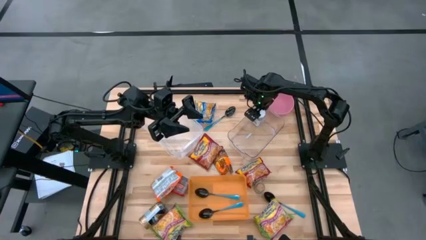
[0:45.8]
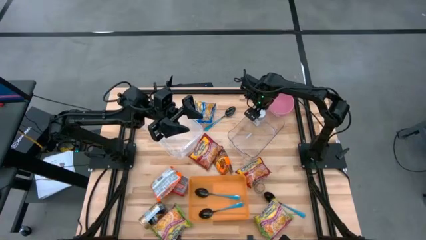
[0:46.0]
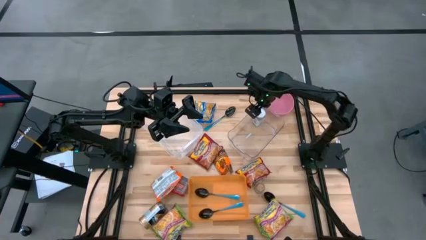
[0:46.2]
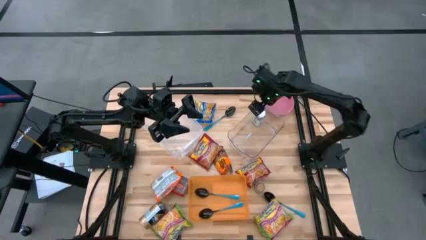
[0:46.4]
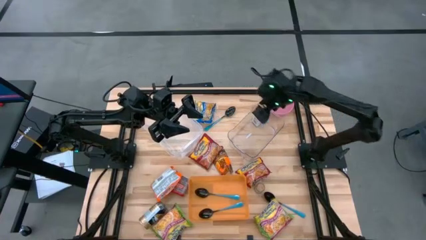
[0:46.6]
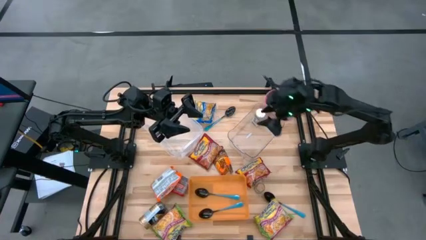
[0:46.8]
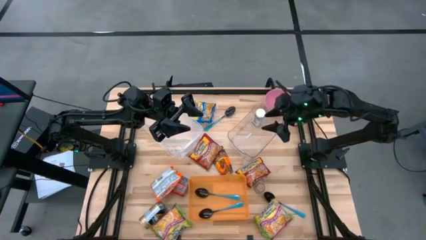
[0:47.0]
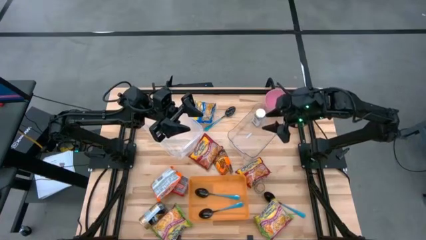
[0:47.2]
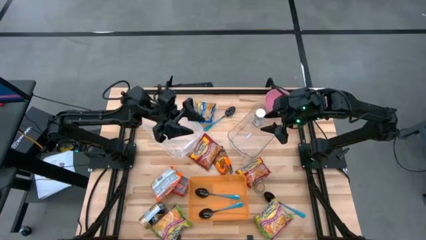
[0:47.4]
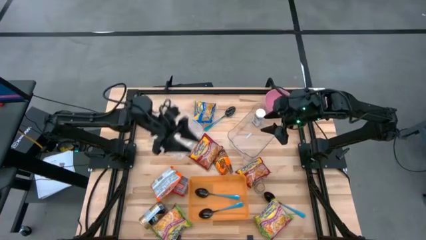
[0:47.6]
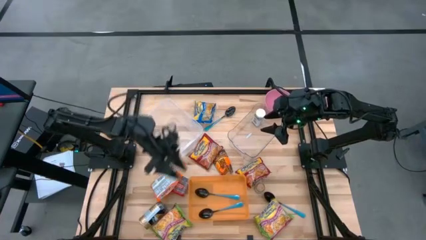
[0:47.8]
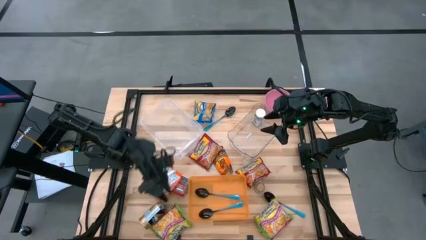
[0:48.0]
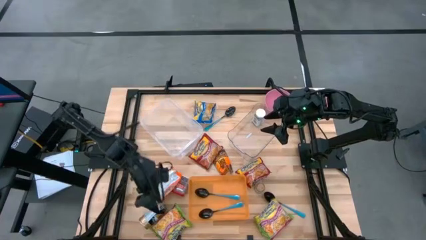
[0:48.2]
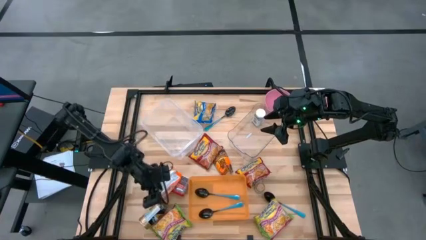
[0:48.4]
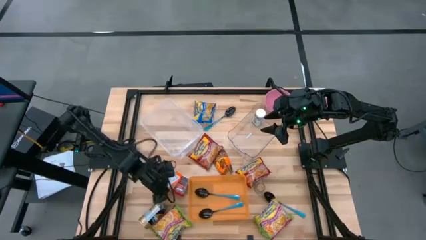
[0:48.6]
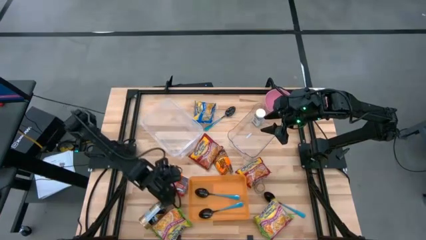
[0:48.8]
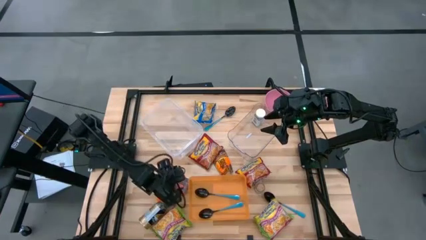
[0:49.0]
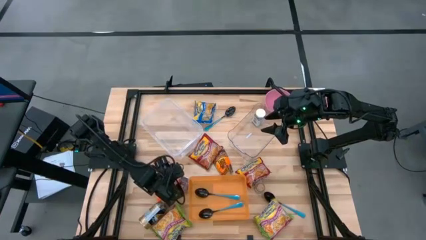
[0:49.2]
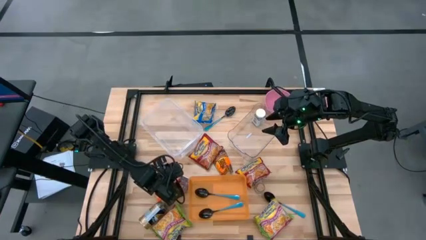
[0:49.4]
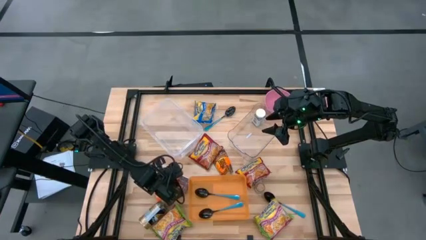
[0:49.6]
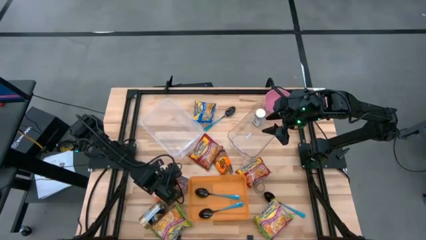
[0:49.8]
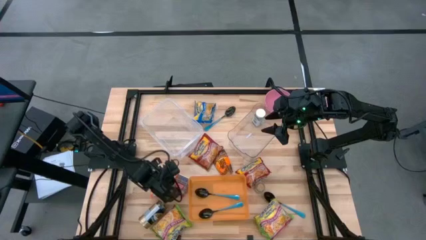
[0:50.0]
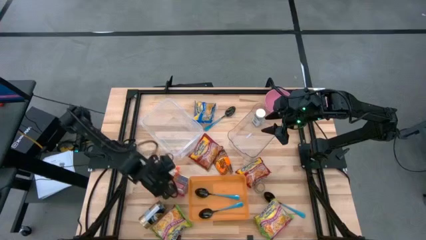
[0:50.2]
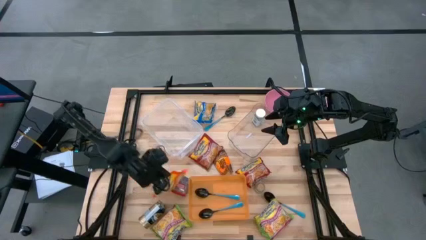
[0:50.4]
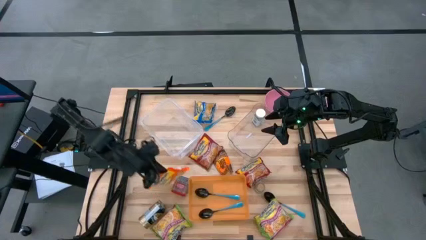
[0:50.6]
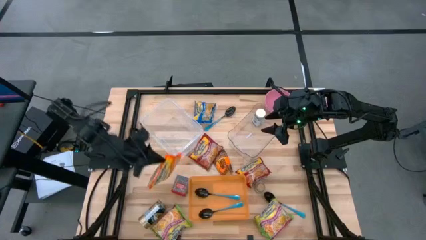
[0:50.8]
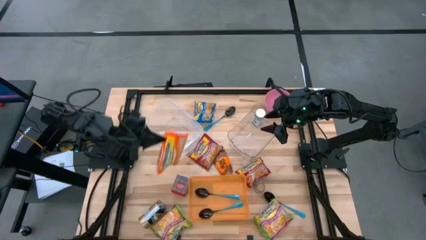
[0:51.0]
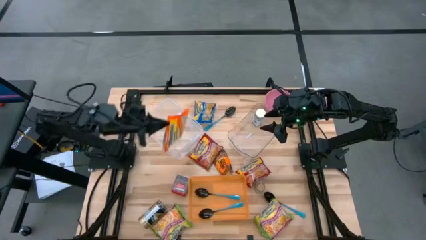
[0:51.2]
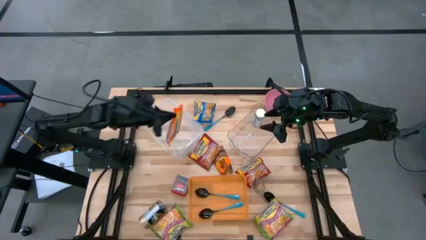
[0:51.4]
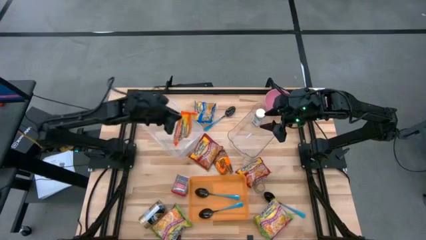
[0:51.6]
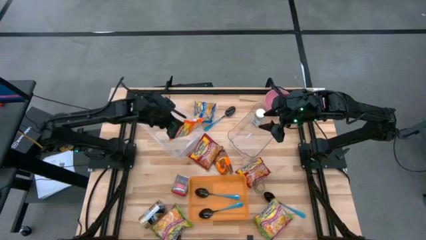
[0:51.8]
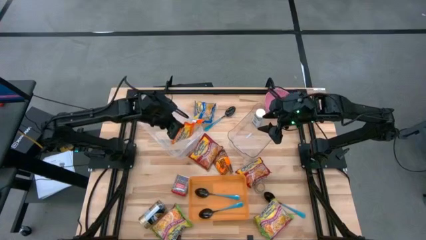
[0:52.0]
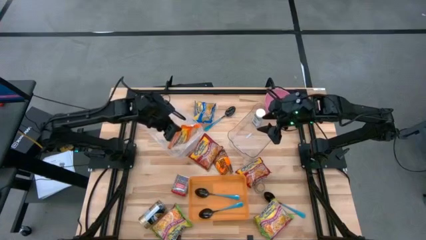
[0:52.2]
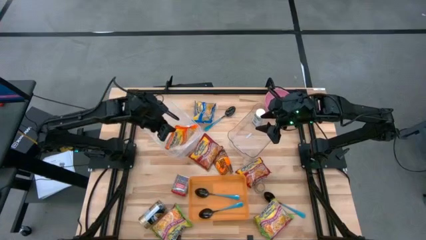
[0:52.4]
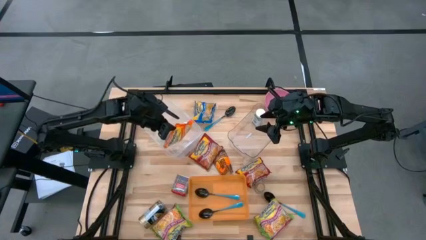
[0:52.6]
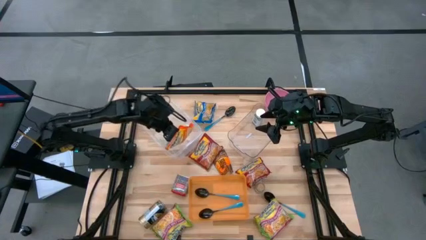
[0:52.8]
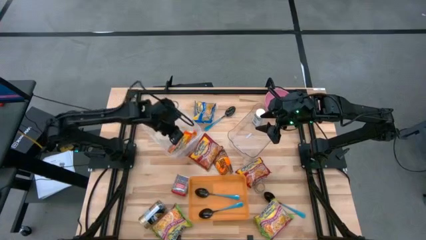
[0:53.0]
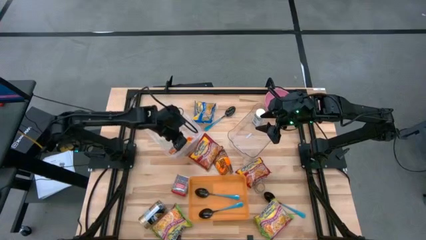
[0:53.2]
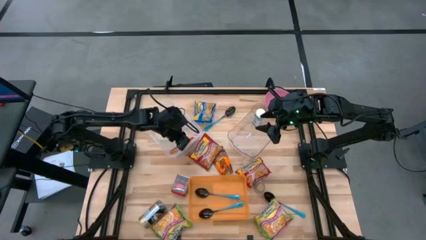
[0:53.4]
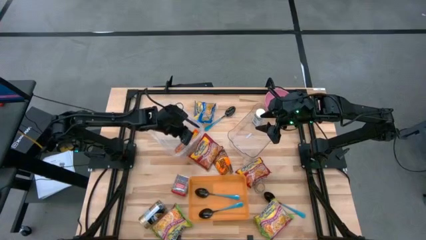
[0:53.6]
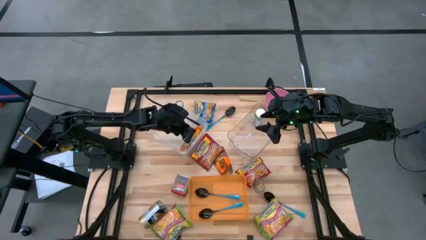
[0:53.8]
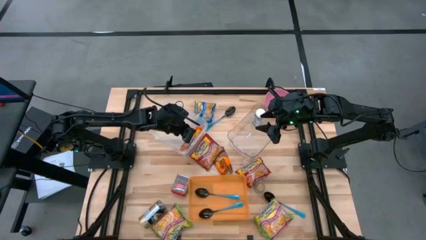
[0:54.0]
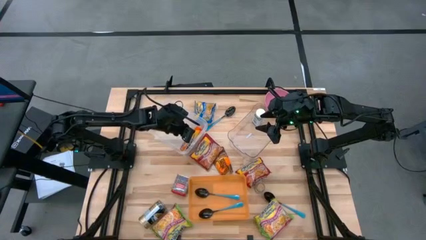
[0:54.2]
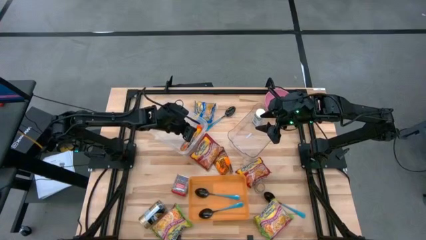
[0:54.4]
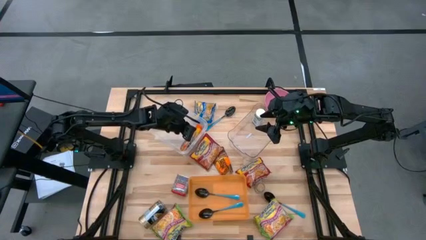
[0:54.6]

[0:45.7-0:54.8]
Task: Pick & Place Food Item
Put the orange noodle pack into the transparent container

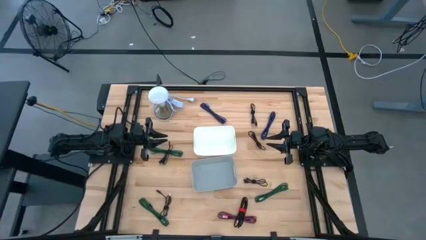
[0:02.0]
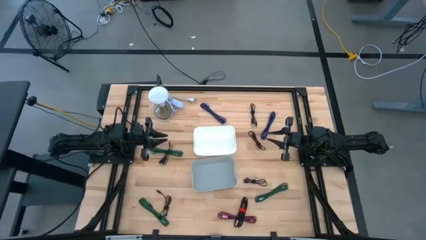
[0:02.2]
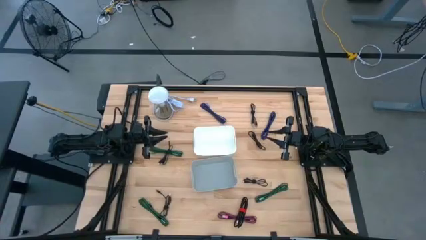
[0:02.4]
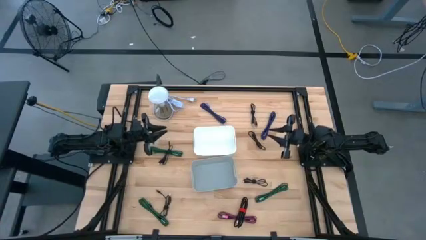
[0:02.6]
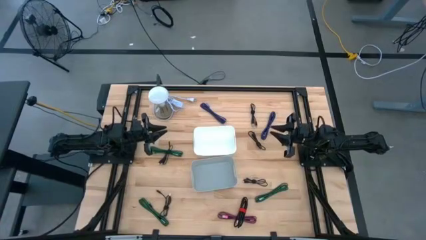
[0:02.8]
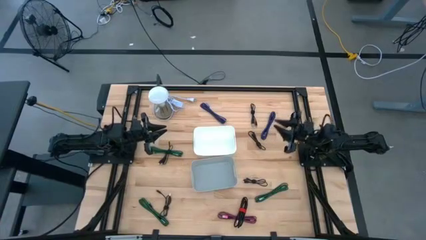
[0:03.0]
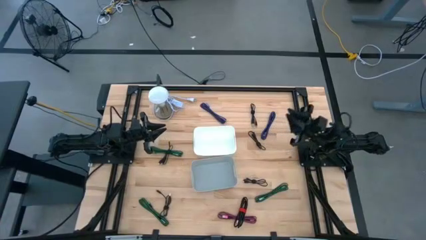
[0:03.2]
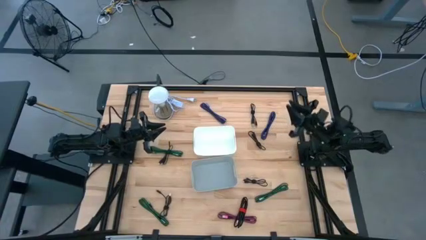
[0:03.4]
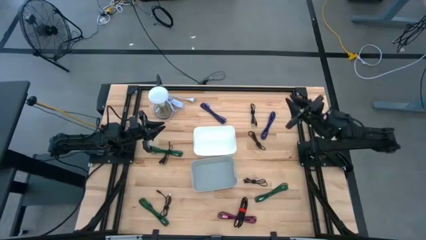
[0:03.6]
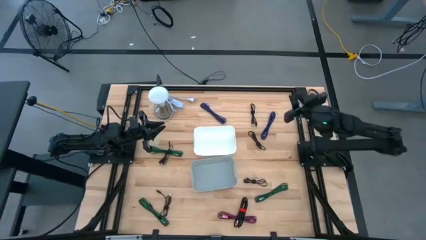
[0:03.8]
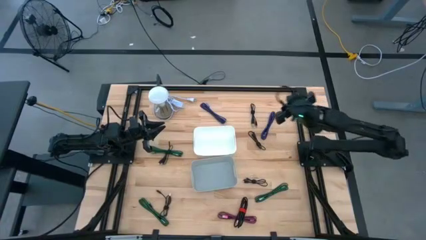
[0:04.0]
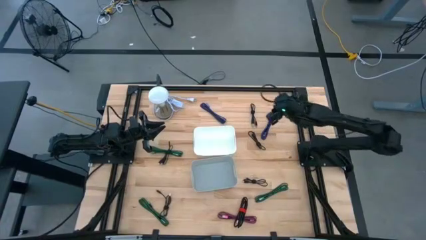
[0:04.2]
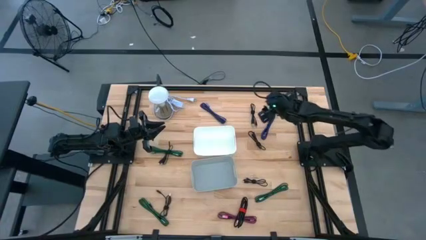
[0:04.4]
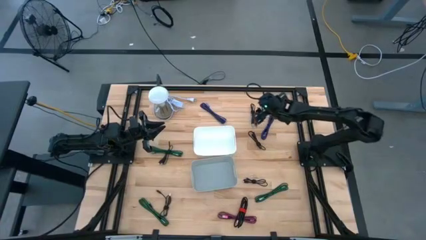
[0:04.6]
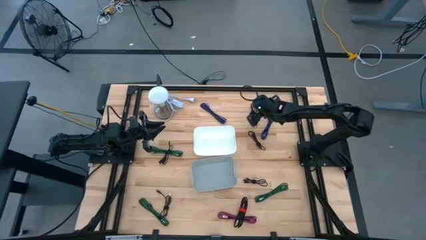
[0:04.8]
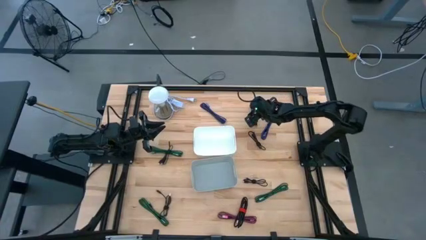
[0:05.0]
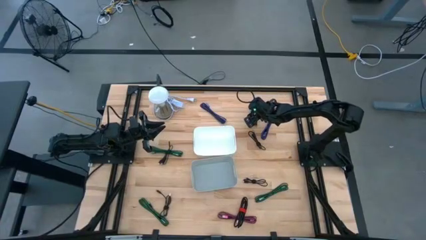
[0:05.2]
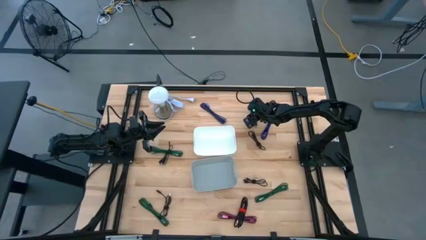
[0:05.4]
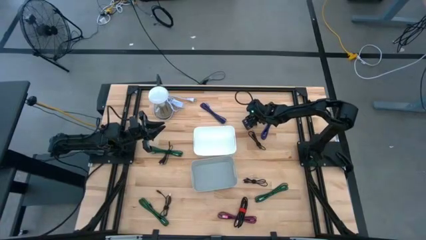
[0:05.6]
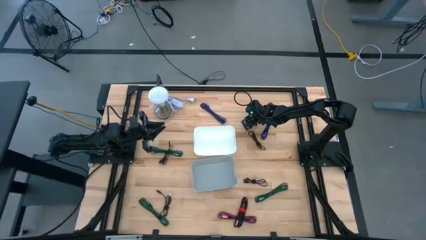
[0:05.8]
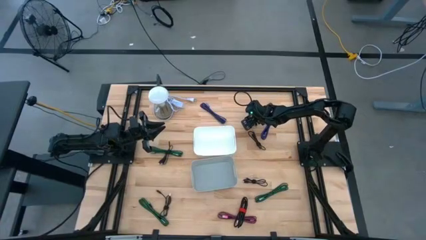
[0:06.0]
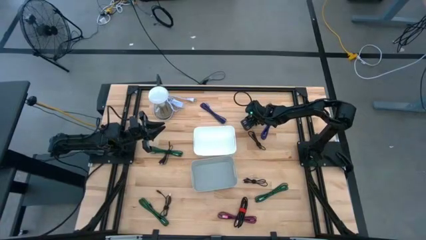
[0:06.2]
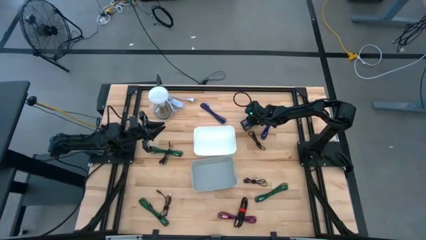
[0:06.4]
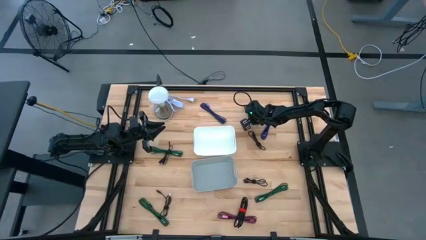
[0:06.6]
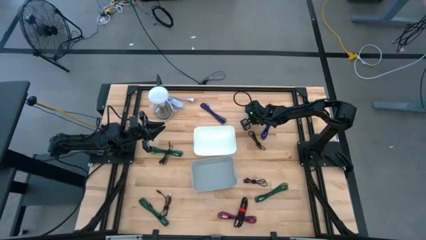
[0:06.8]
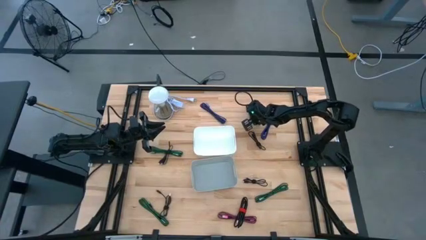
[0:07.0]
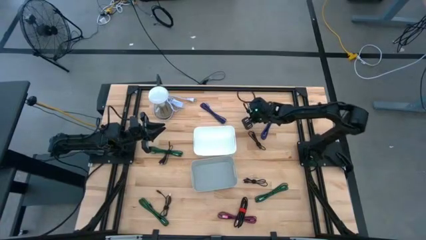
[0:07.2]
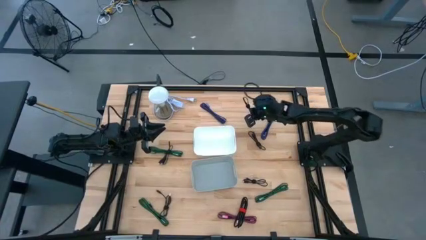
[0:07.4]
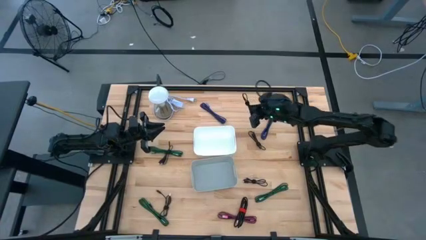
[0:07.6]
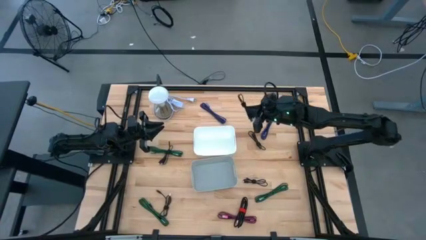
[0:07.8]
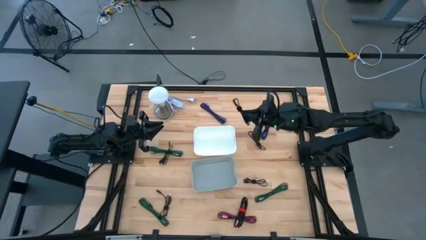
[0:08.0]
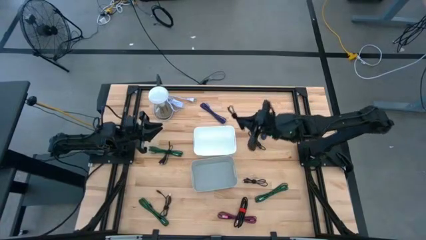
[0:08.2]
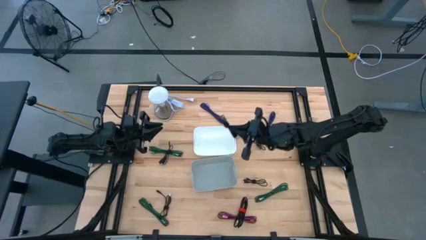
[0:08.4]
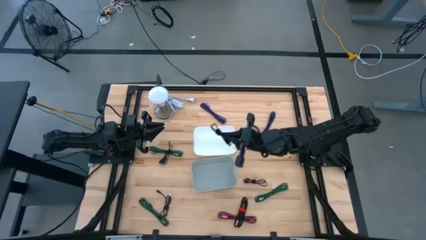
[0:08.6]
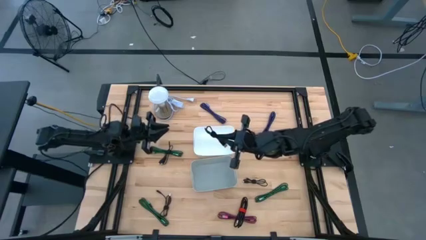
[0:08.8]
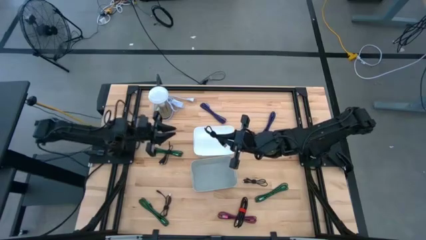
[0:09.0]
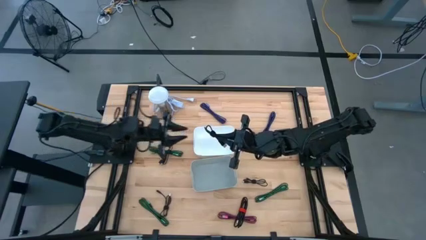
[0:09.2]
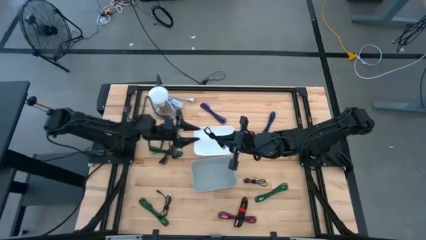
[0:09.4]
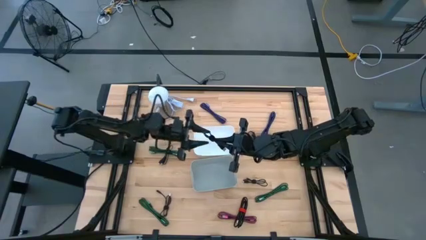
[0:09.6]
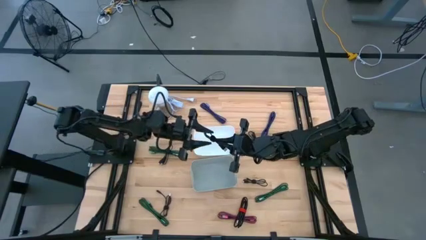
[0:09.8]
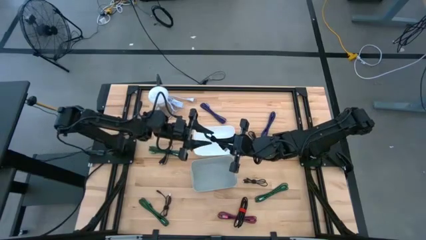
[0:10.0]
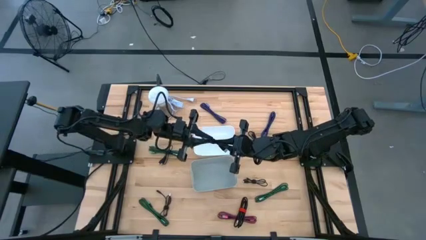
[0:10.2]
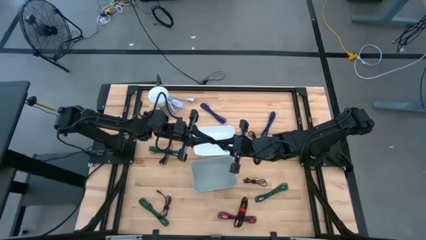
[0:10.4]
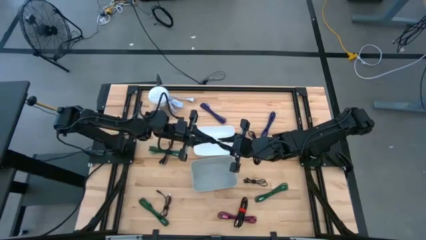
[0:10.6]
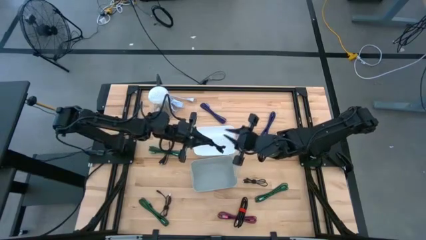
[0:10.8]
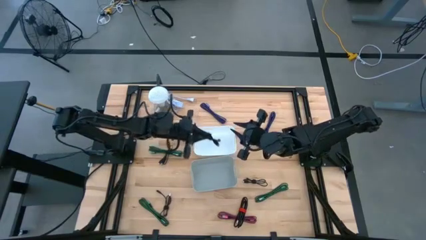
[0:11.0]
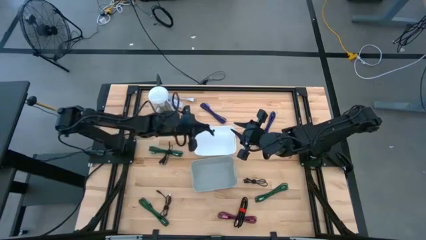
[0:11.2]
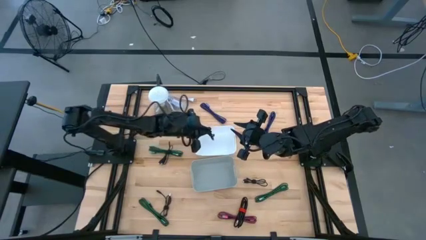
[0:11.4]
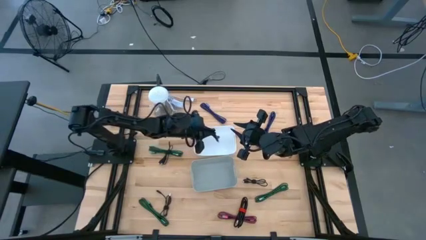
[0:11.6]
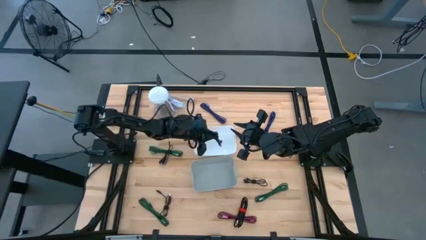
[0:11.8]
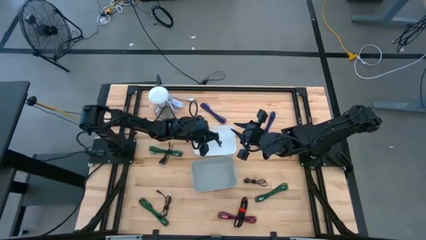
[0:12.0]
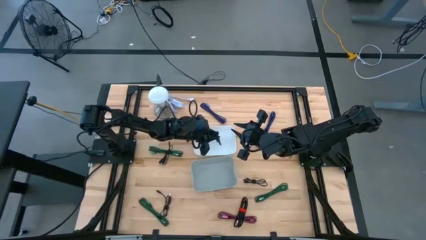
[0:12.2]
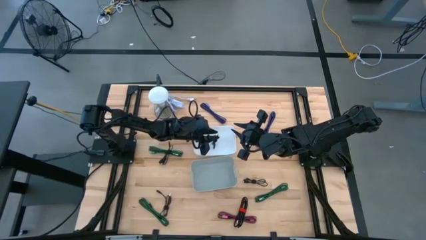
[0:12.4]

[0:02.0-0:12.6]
Task: Pick & Place USB Port
Put the black charger cable into the white container
